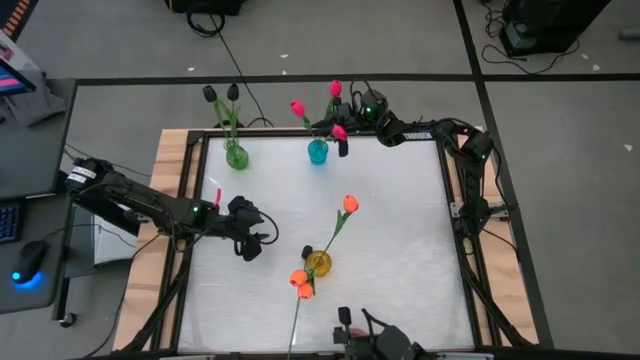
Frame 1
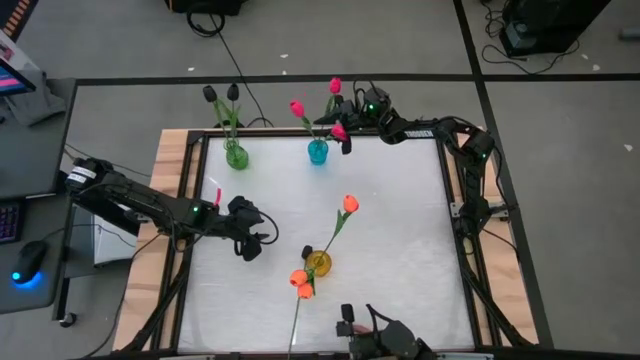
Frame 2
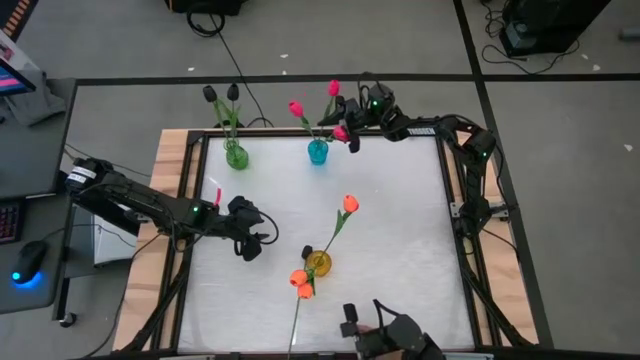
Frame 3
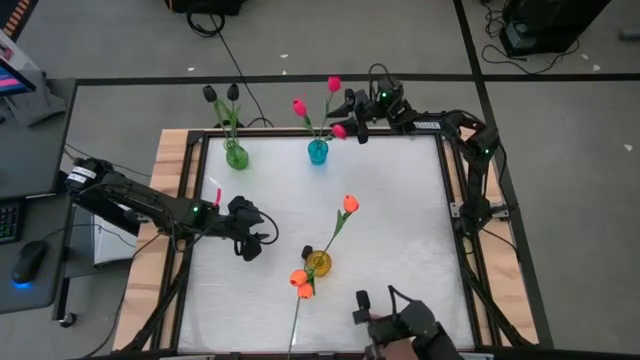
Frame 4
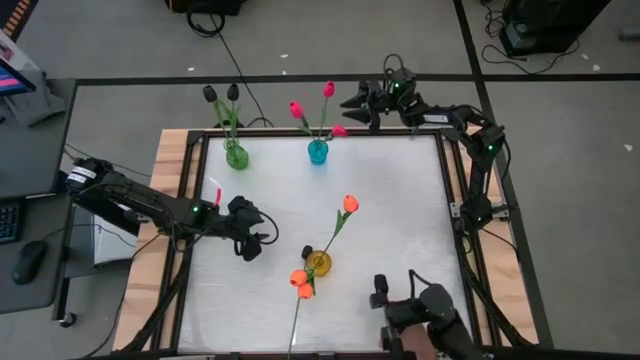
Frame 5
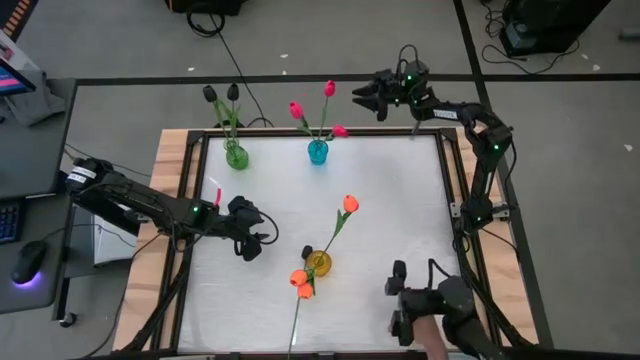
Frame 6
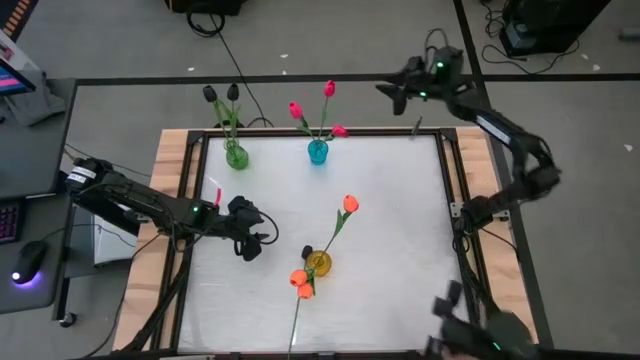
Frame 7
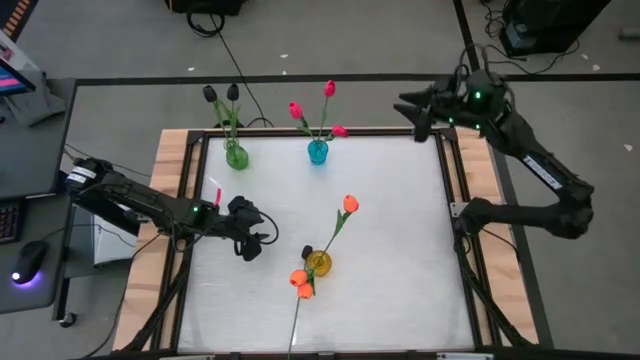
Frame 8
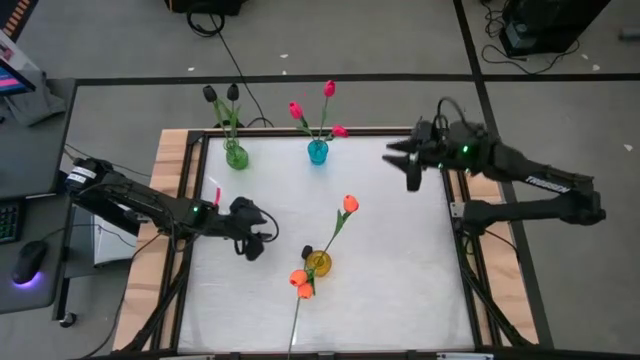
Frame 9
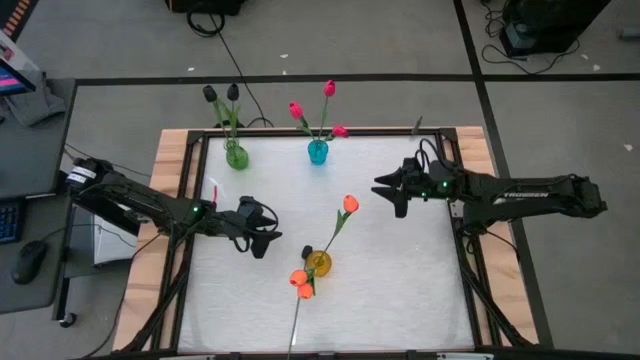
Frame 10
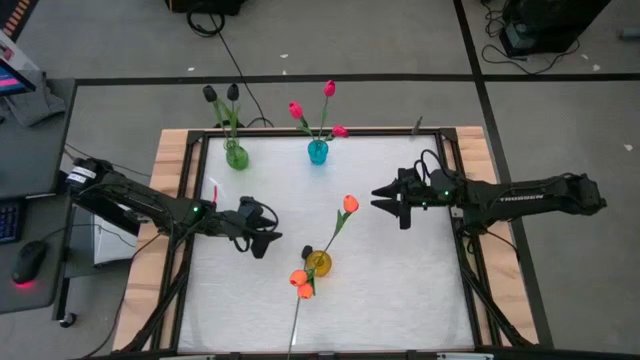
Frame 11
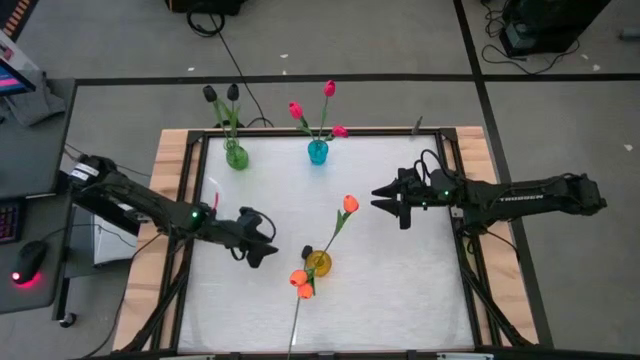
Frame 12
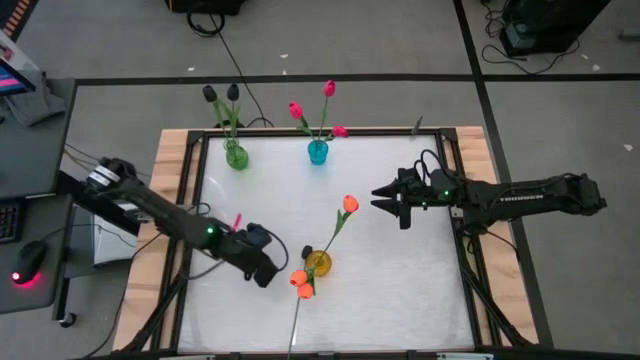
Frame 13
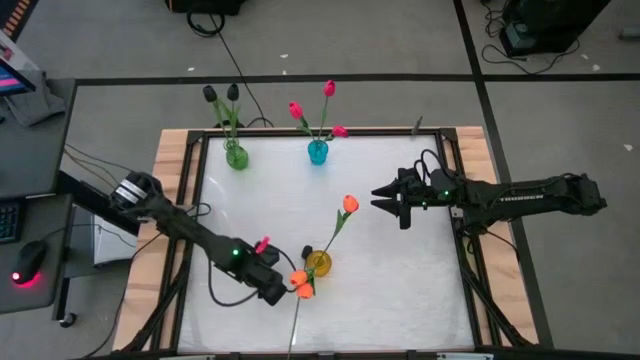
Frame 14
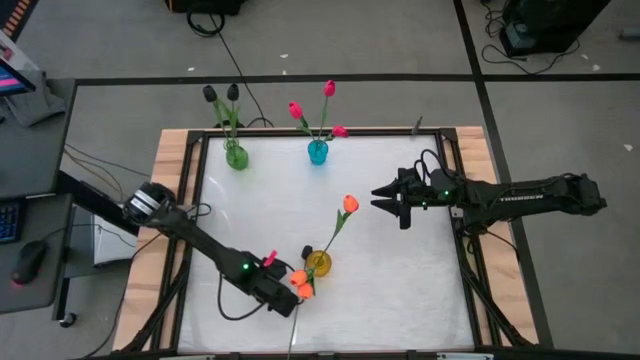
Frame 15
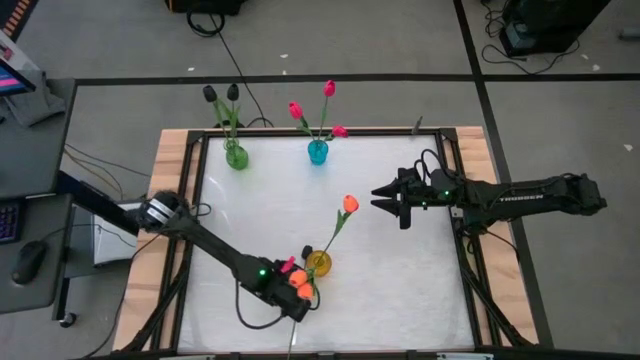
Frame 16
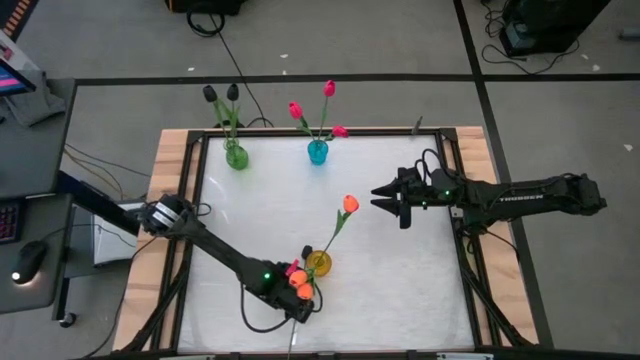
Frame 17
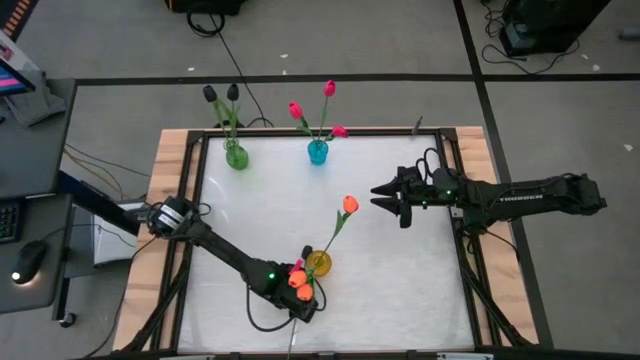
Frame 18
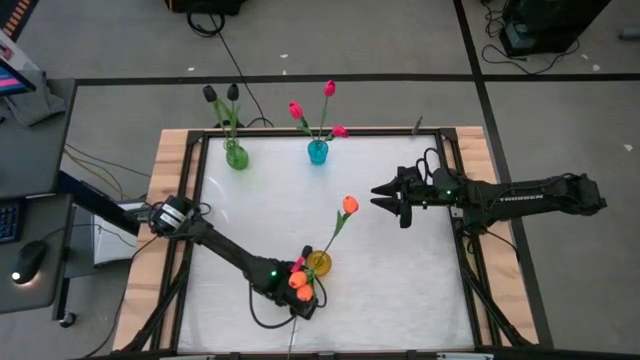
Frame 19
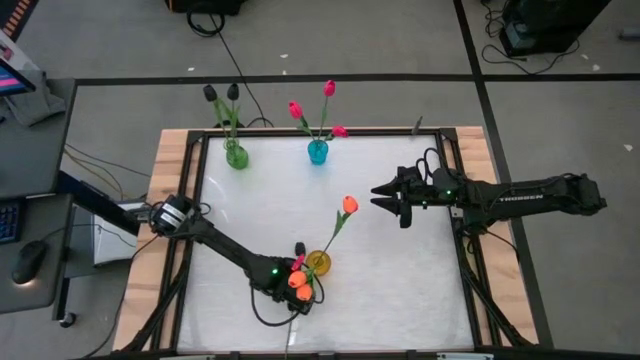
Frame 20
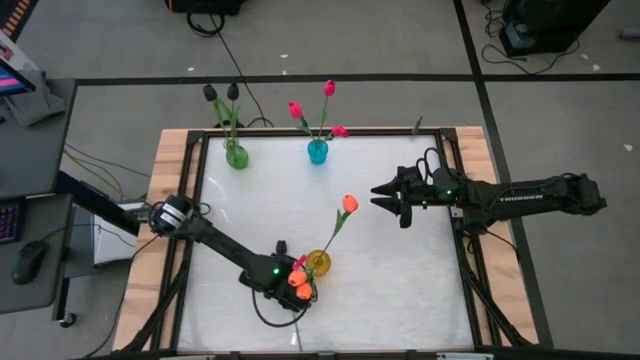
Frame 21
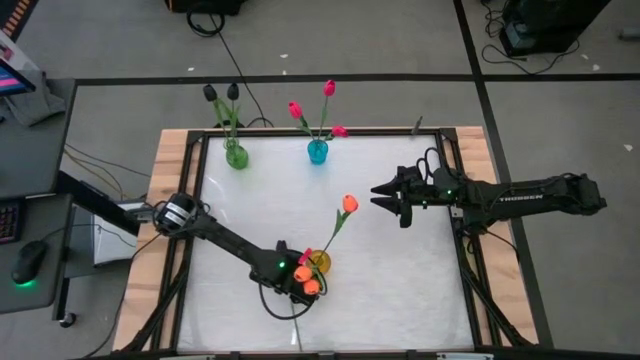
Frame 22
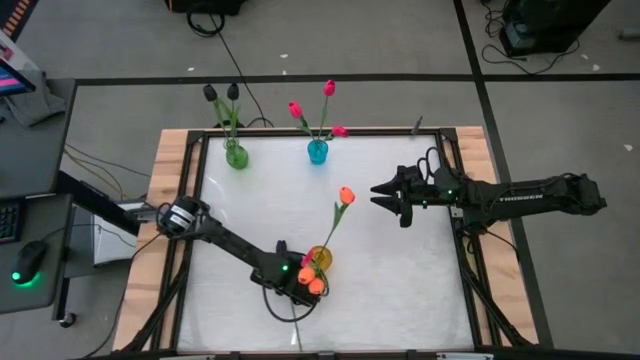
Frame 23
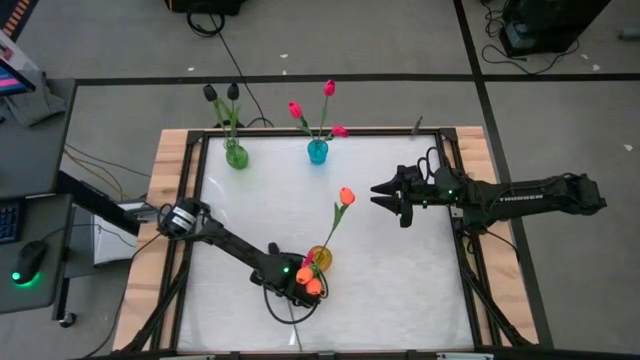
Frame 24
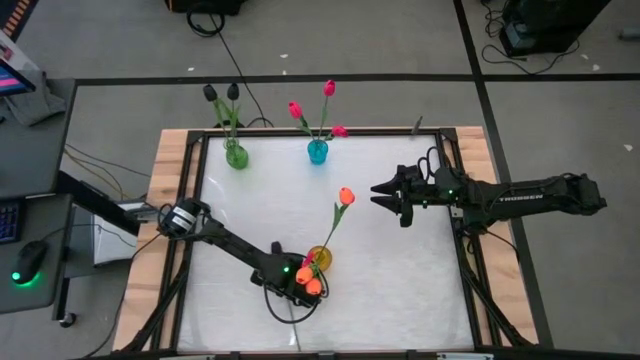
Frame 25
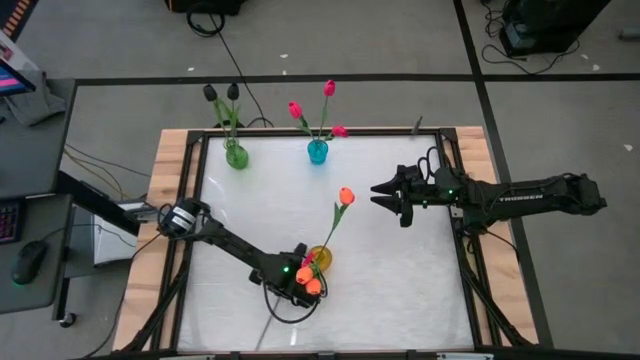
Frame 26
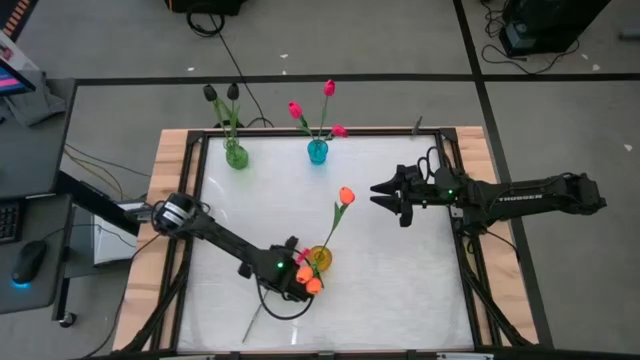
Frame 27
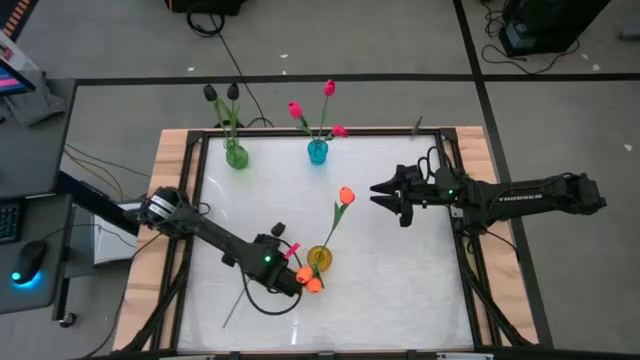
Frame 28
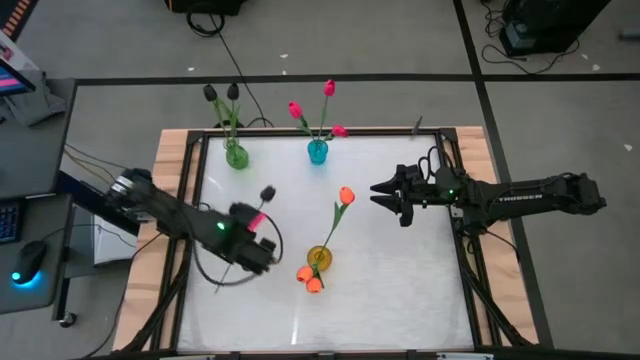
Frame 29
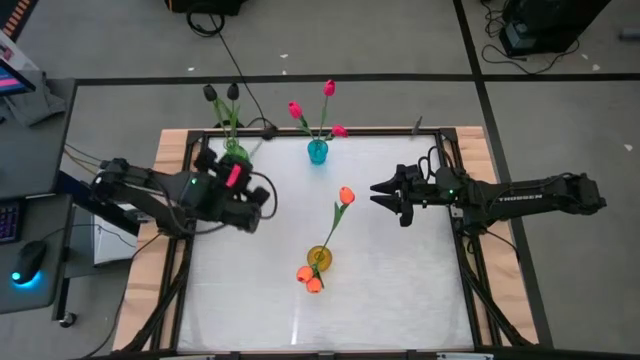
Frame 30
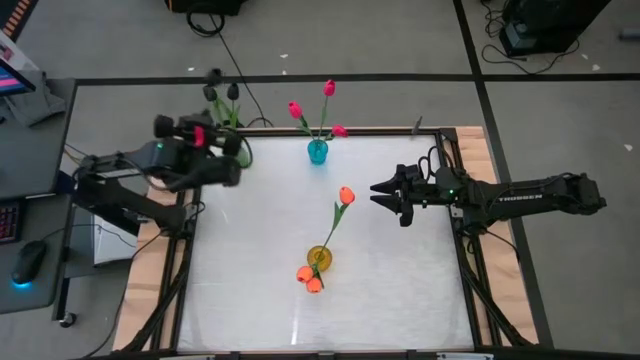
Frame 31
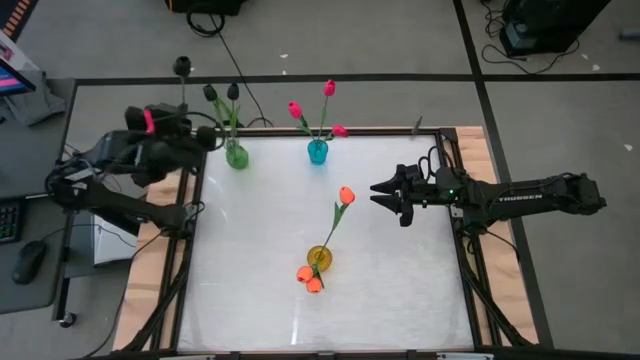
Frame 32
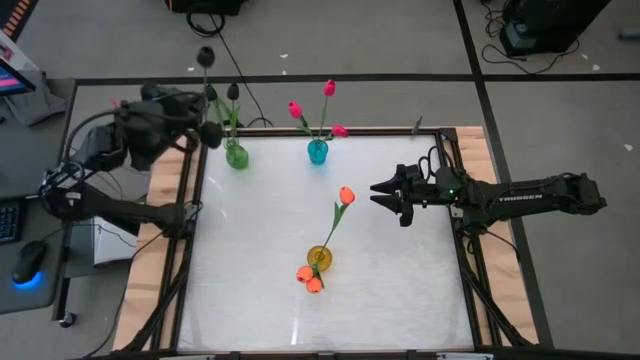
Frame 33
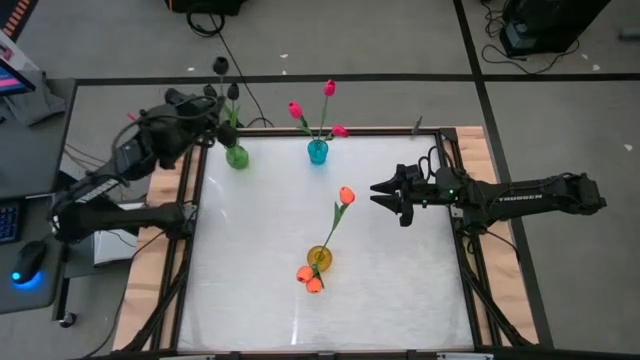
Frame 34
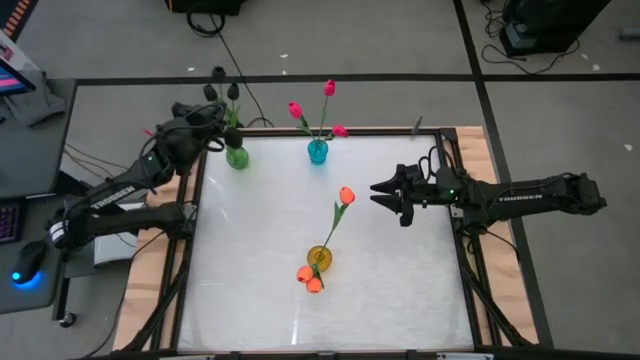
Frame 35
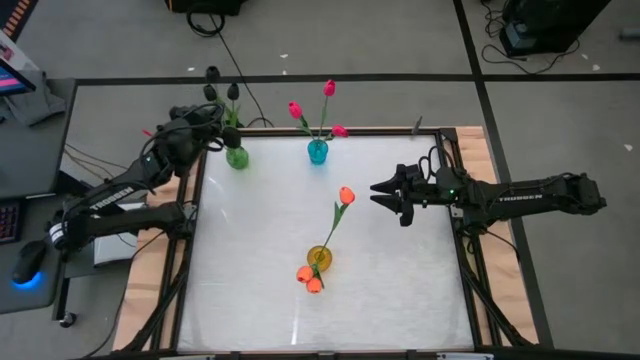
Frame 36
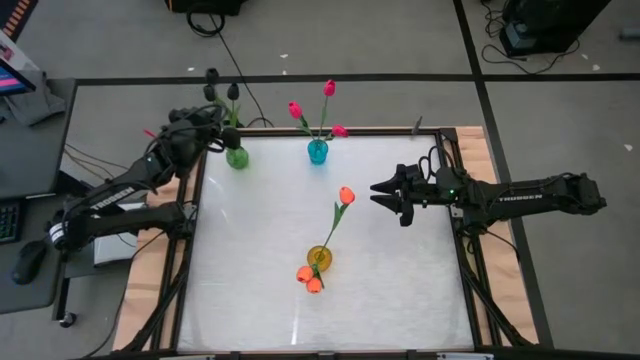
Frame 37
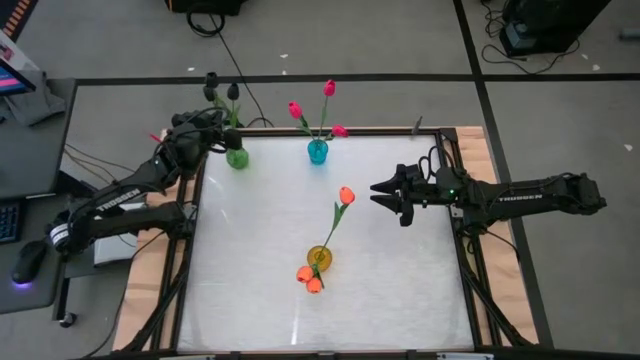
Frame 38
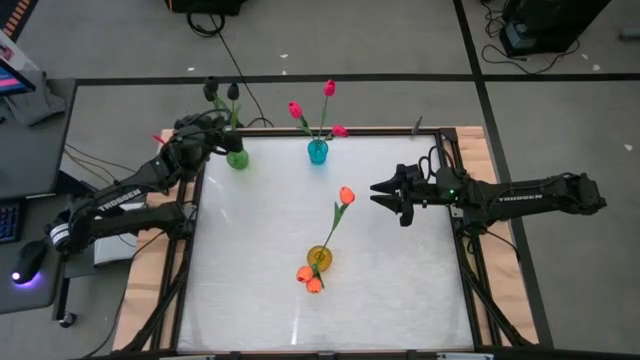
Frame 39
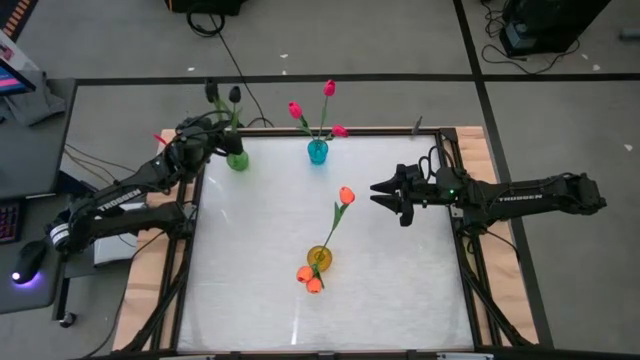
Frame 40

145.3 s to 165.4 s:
Task: Sort flowers into vase by color
Put the black flower into the green vase

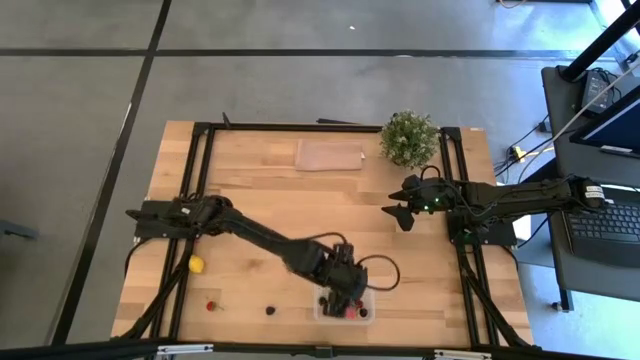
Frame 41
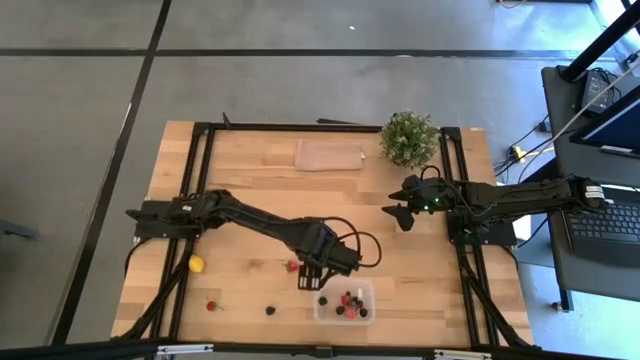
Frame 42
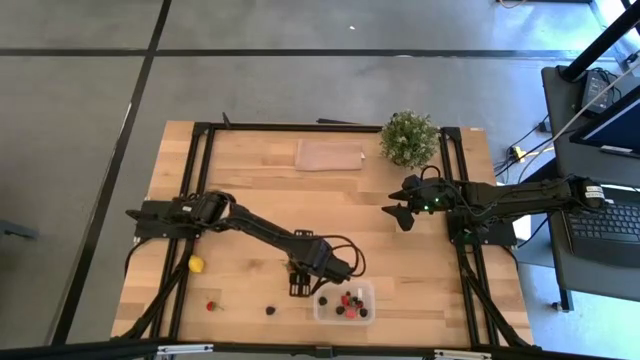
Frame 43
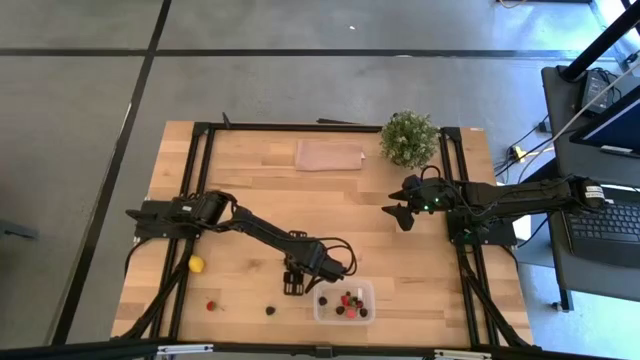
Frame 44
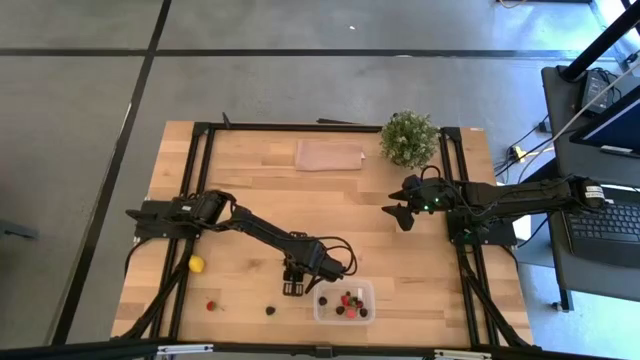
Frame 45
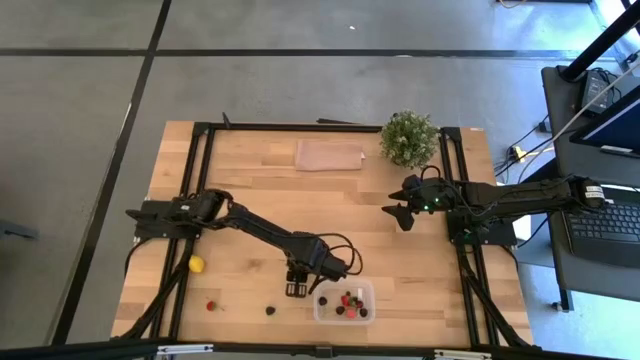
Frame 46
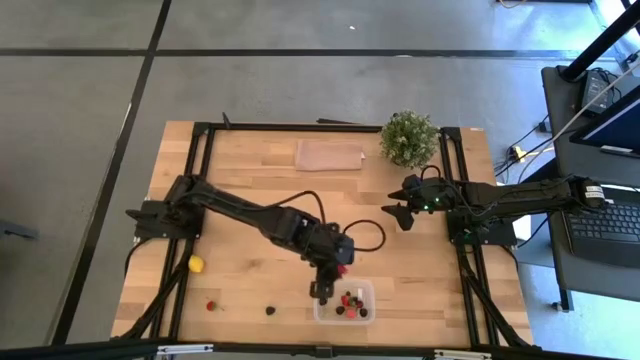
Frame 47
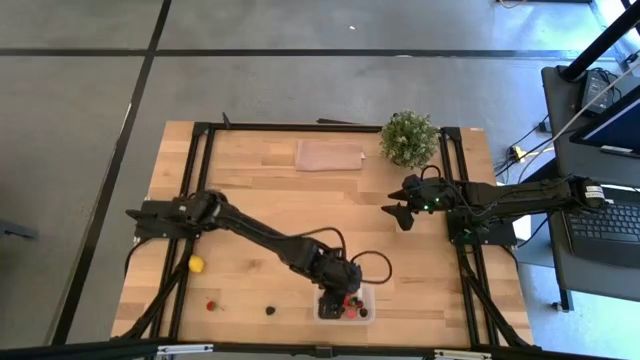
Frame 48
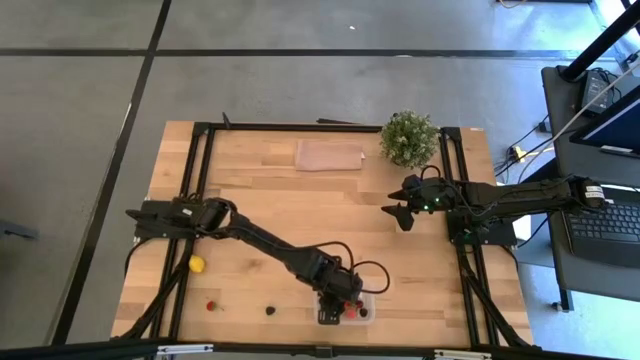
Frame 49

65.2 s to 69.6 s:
Task: Pick and placing Produce into tupperware
Put the top strawberry into the transparent container
